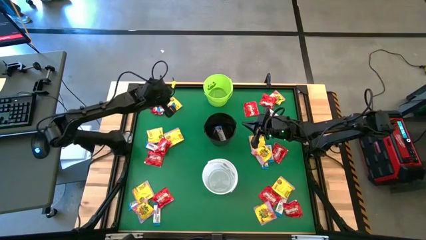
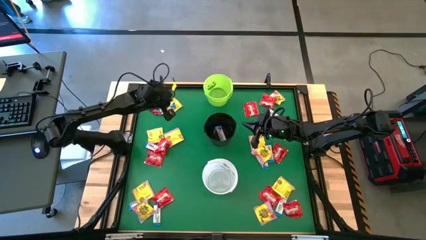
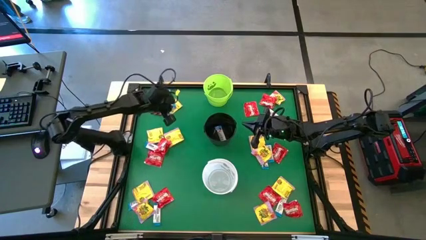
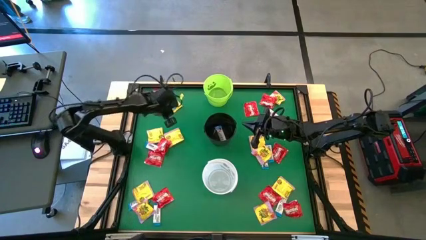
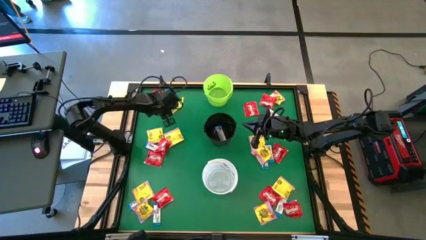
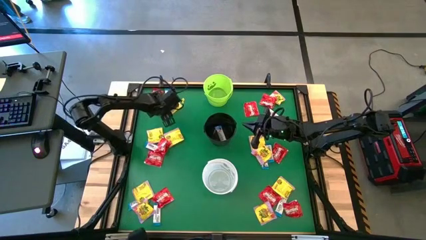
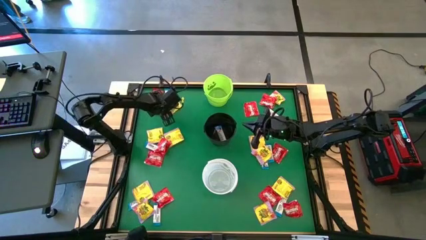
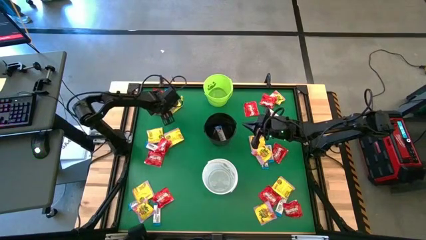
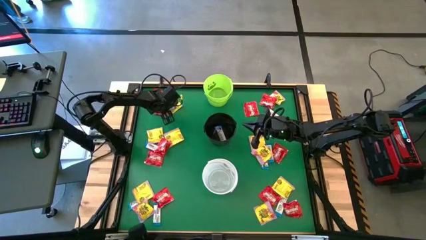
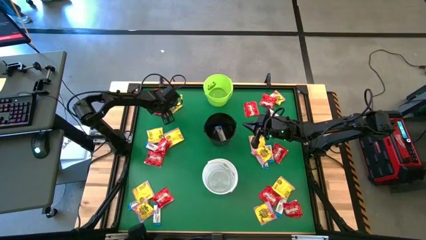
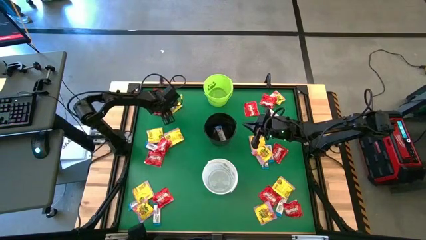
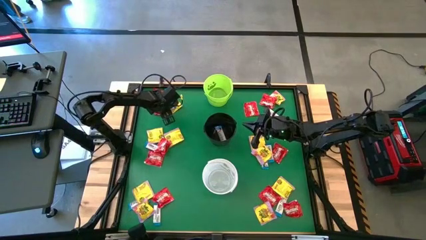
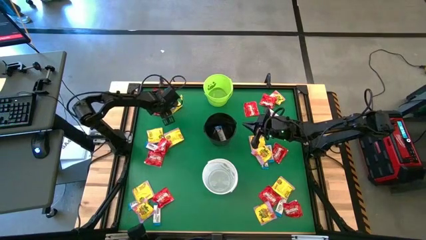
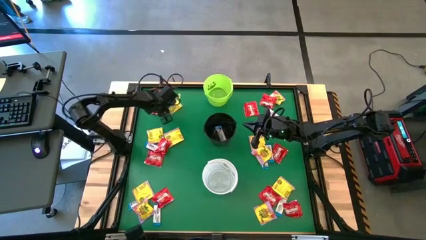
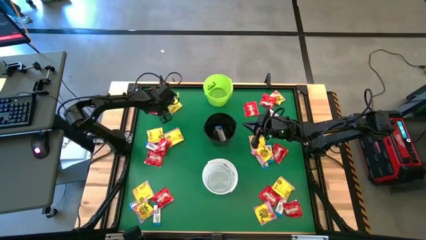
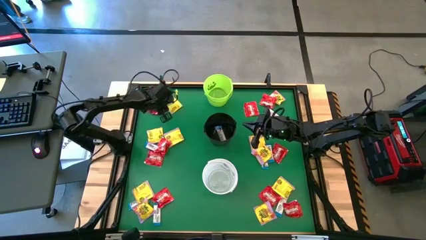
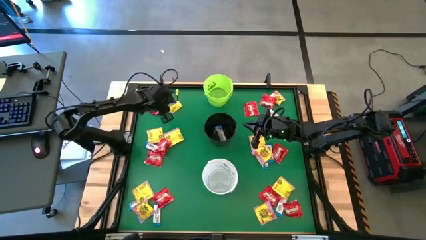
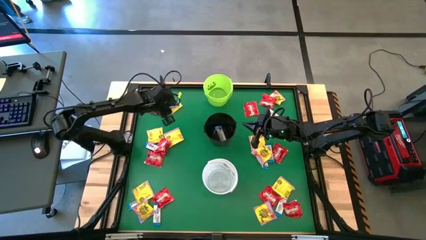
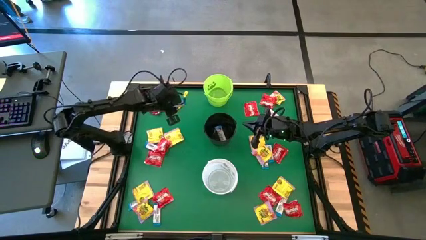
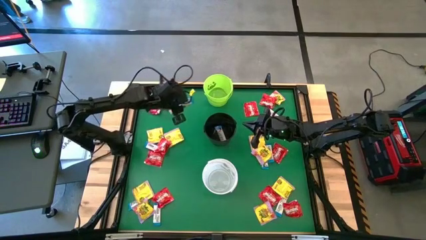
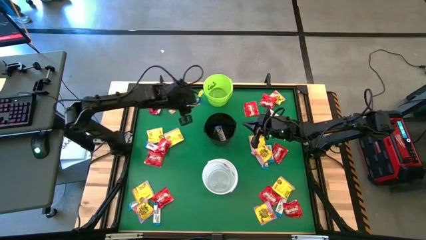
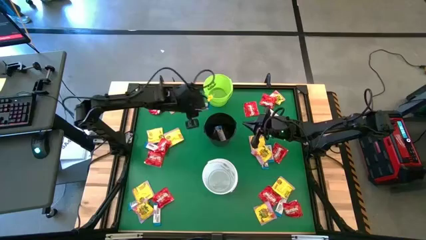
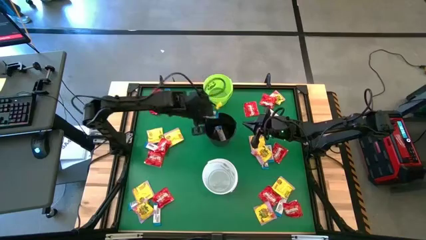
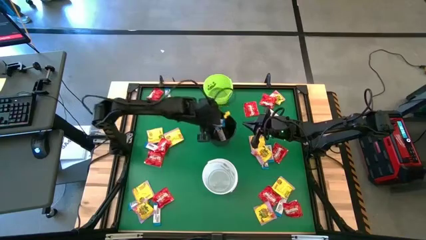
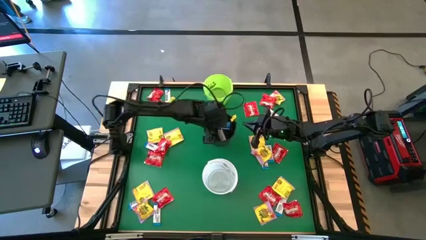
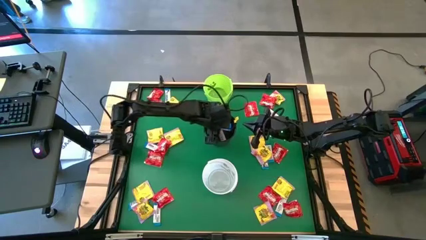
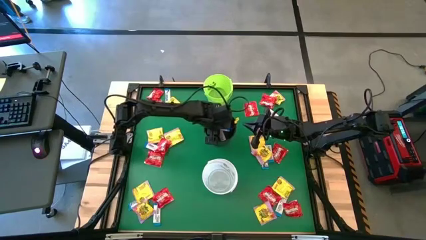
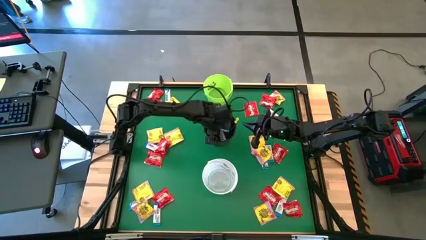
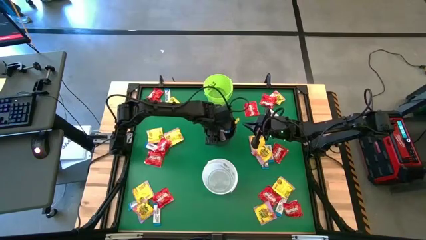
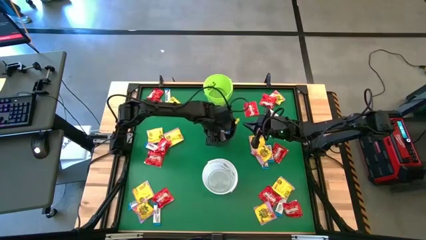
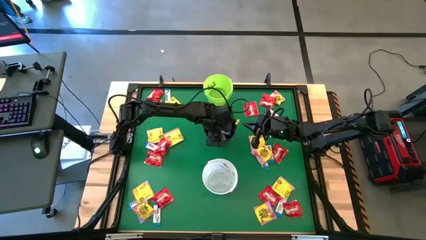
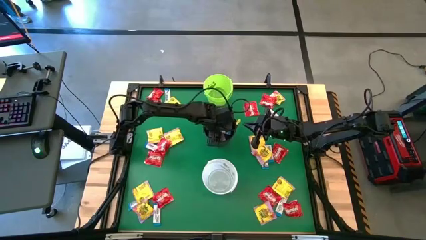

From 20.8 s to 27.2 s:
Task: Sort candy by brand, put in halloween buckets
Put the white chocolate into the black bucket

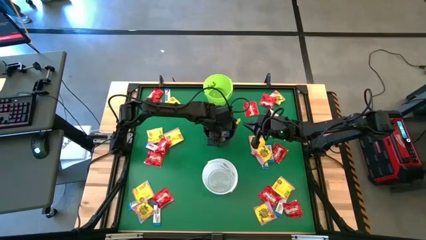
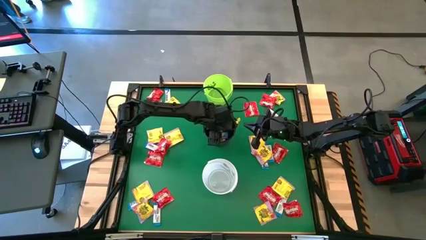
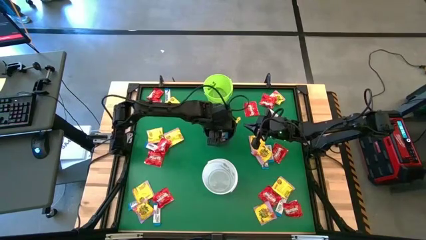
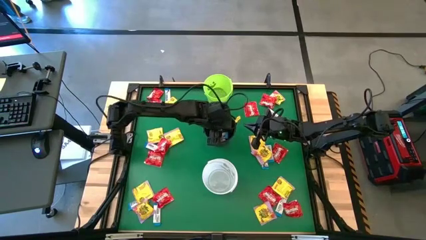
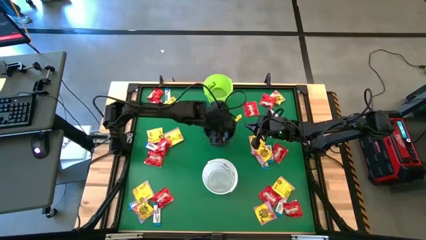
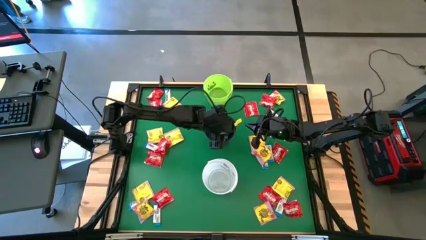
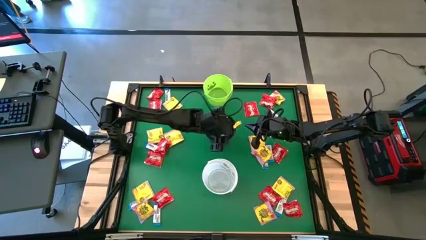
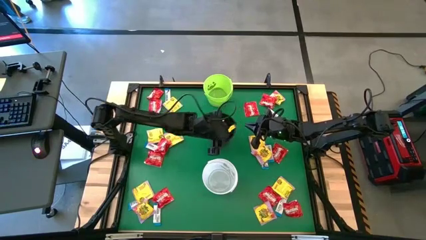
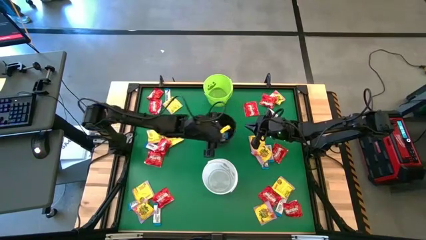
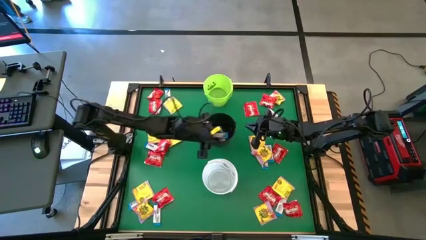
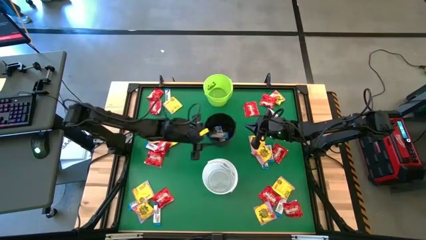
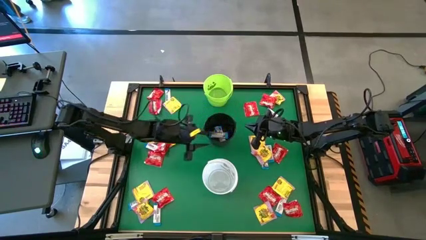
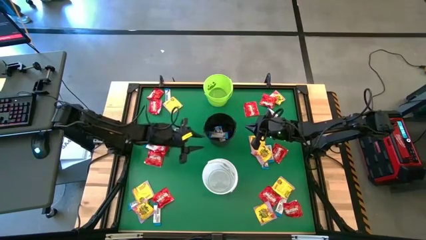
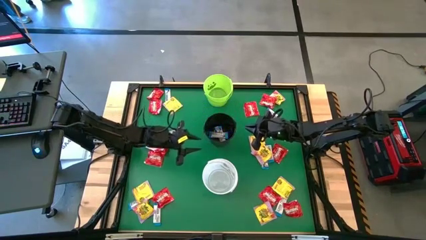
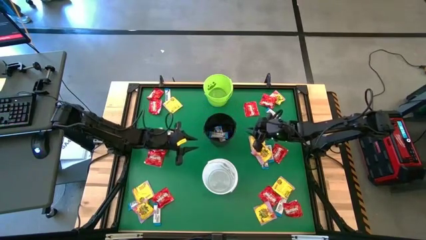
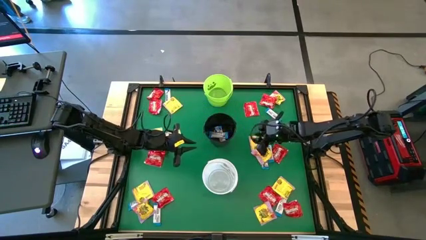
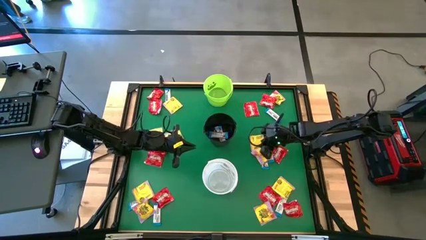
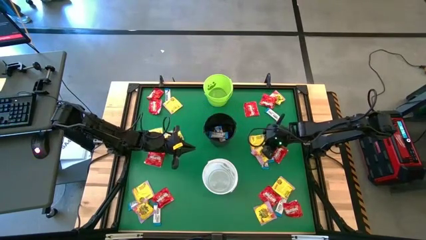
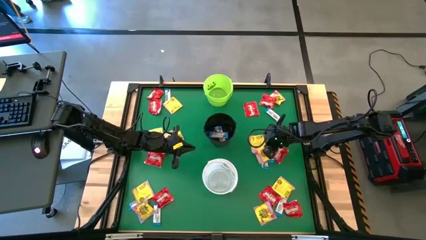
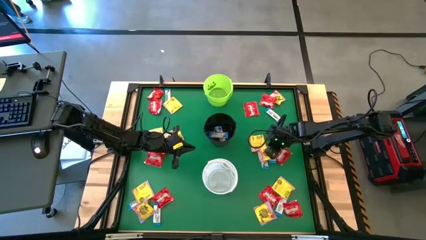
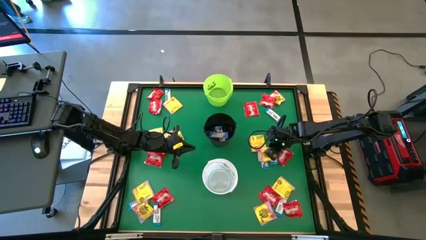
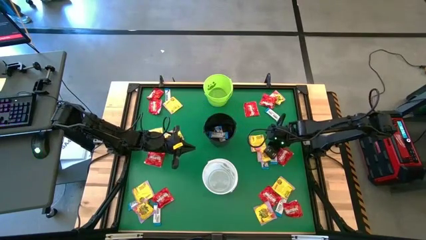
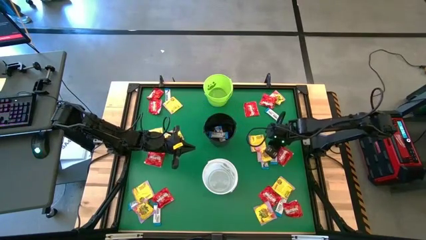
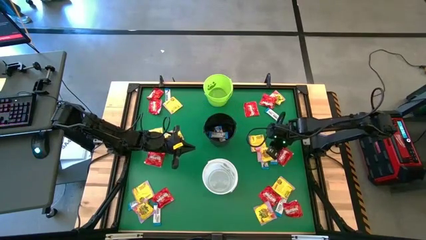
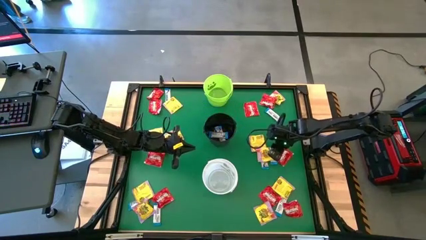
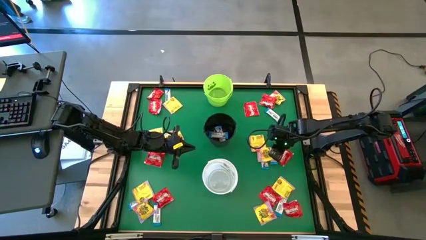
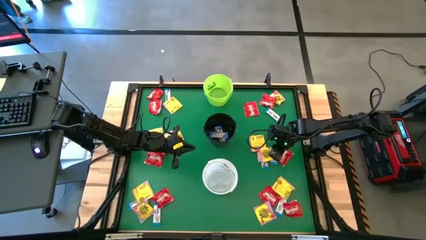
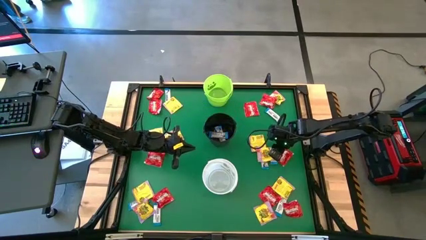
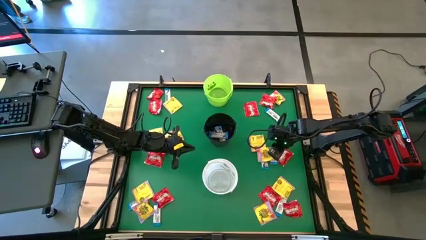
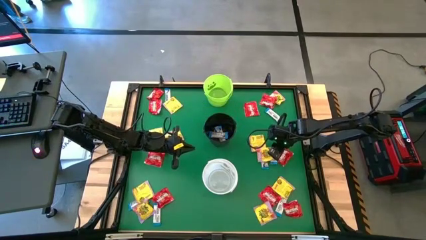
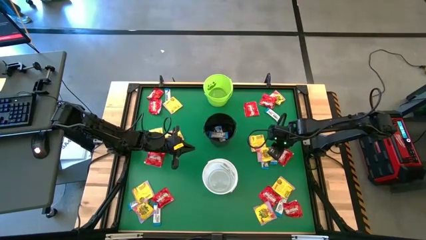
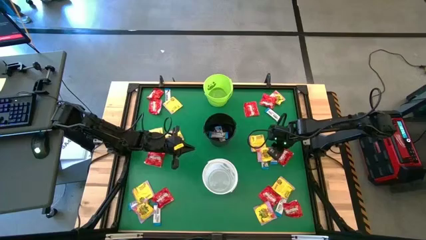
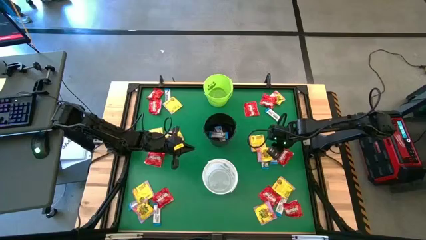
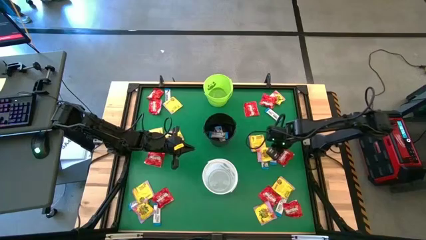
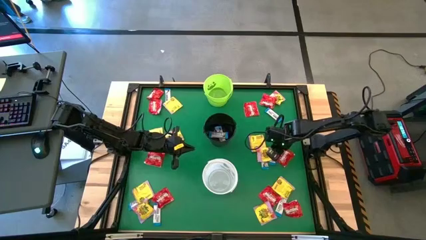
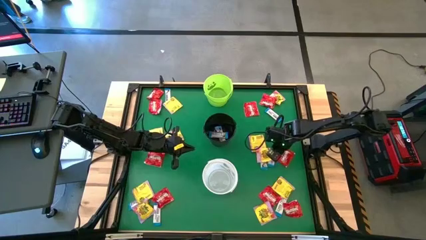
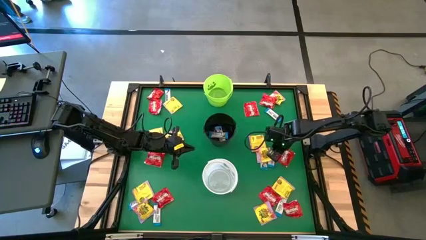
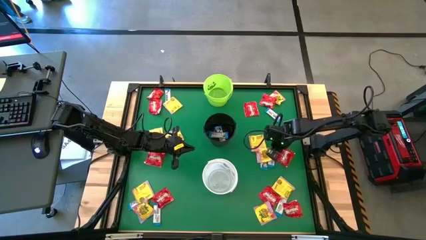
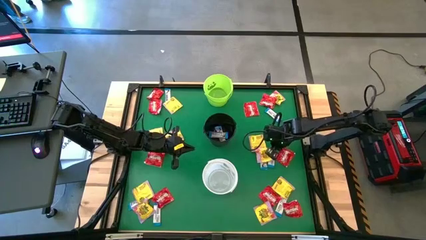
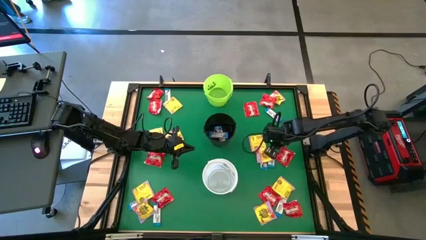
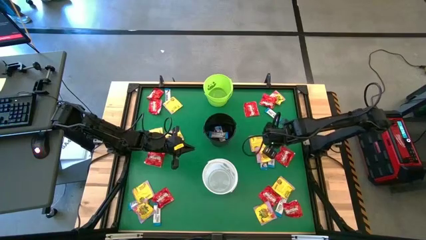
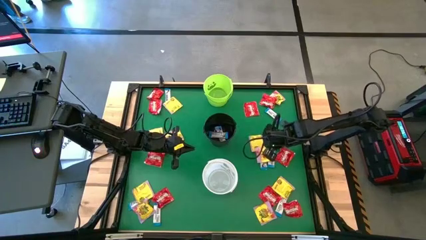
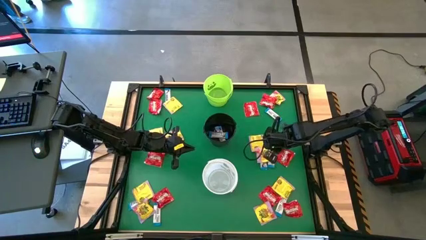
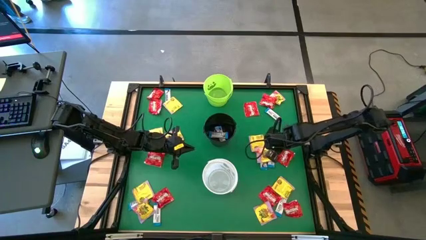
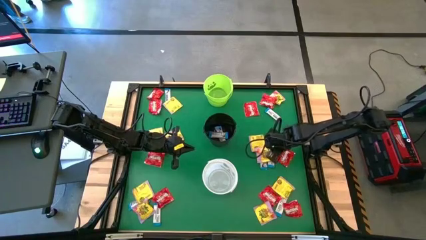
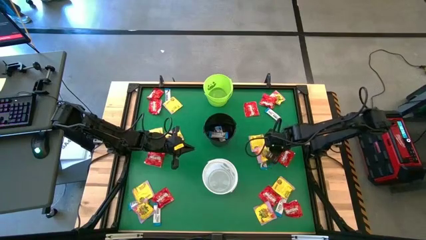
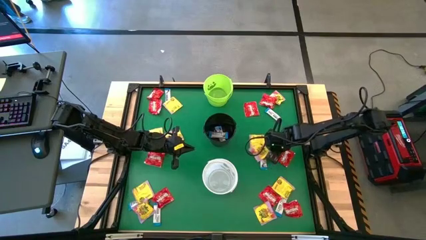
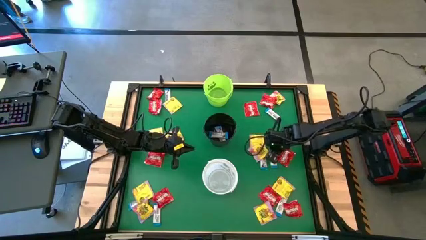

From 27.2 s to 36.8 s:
Put the white chocolate into the black bucket
